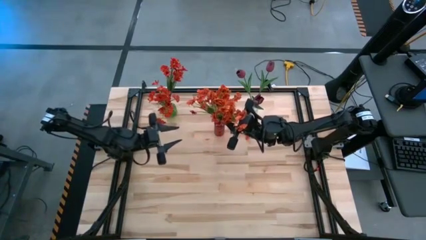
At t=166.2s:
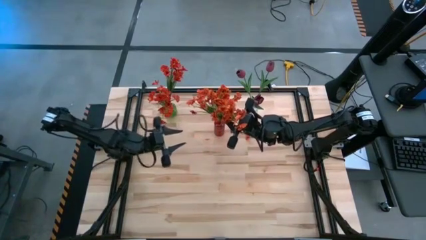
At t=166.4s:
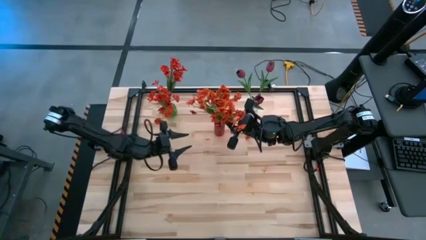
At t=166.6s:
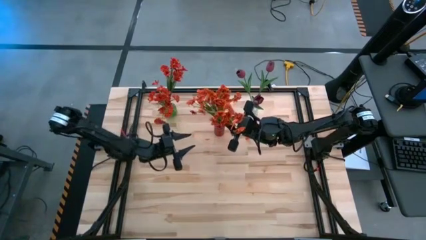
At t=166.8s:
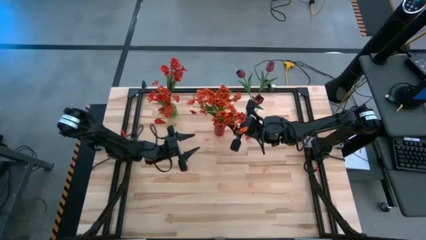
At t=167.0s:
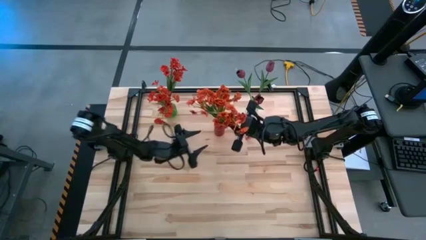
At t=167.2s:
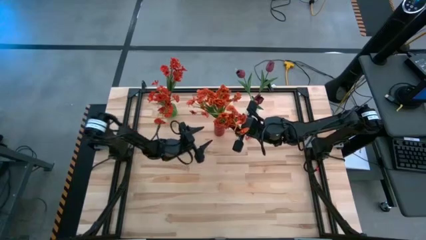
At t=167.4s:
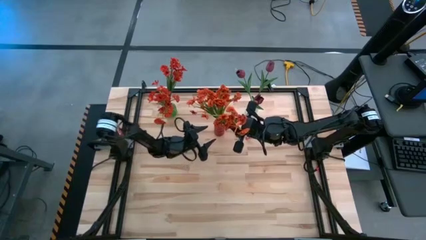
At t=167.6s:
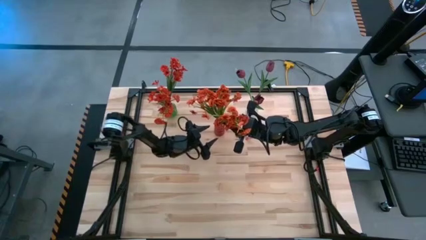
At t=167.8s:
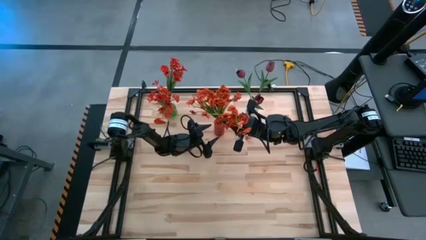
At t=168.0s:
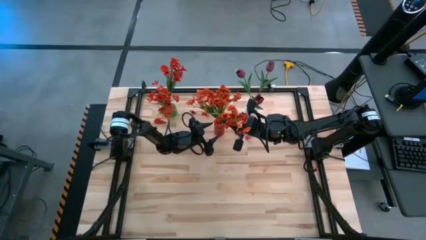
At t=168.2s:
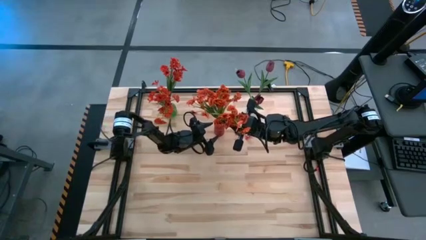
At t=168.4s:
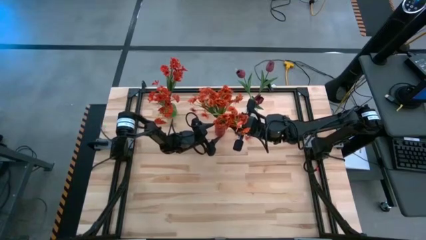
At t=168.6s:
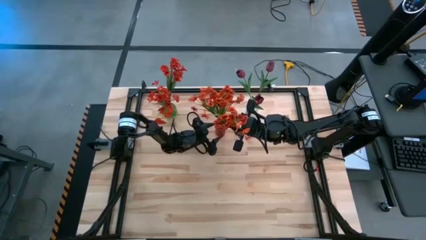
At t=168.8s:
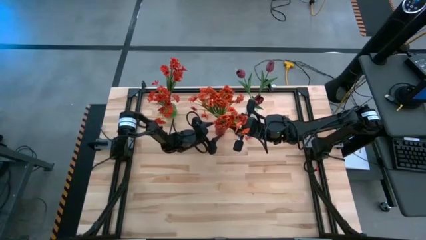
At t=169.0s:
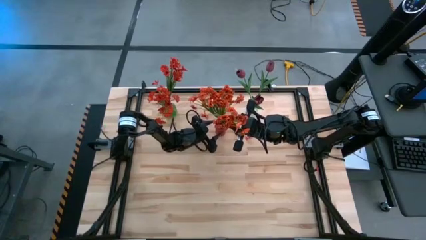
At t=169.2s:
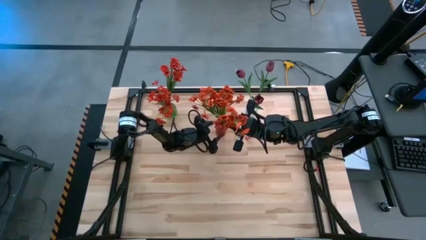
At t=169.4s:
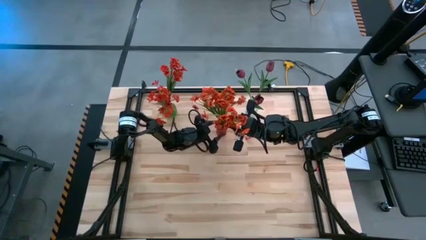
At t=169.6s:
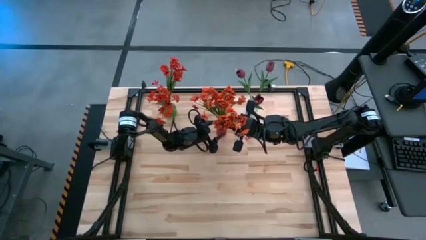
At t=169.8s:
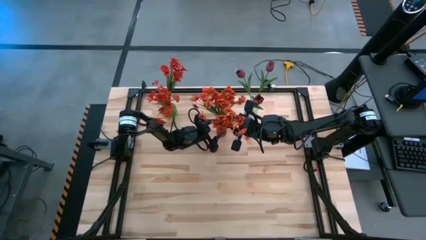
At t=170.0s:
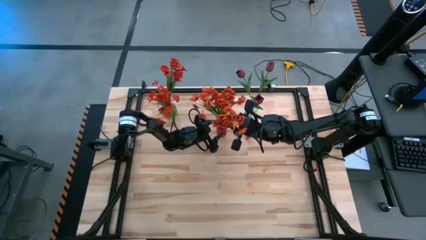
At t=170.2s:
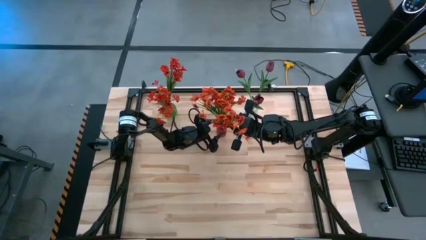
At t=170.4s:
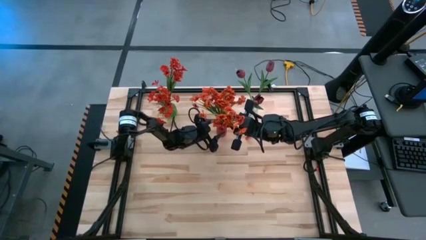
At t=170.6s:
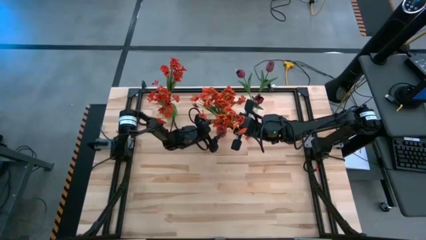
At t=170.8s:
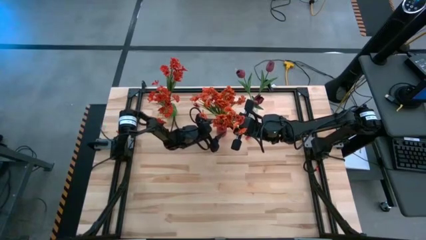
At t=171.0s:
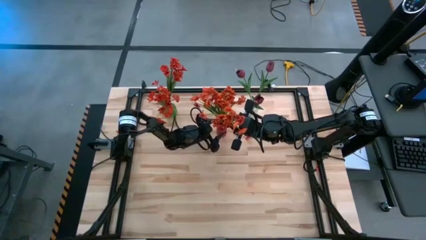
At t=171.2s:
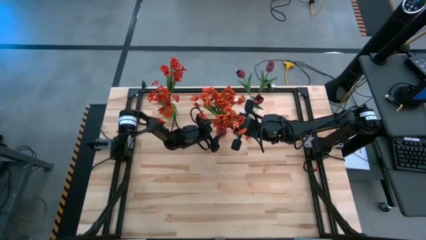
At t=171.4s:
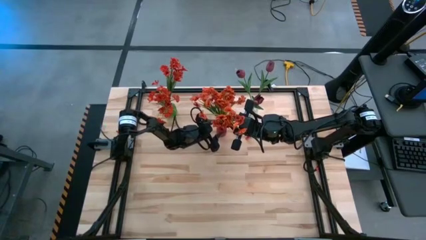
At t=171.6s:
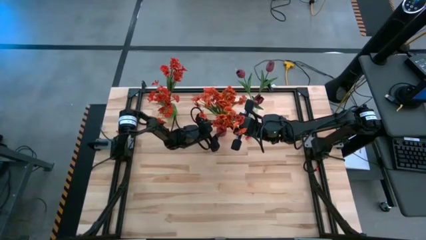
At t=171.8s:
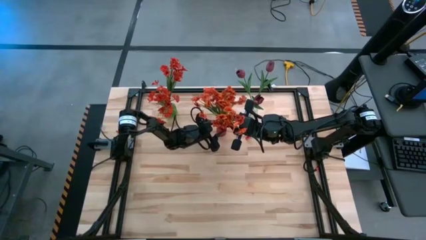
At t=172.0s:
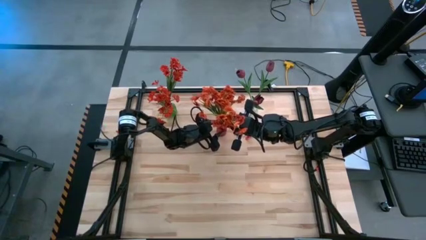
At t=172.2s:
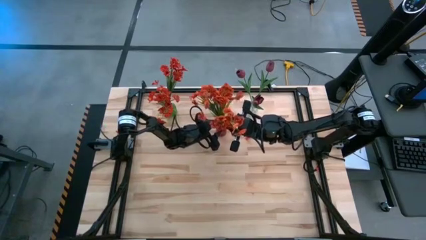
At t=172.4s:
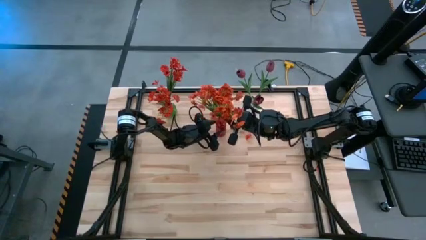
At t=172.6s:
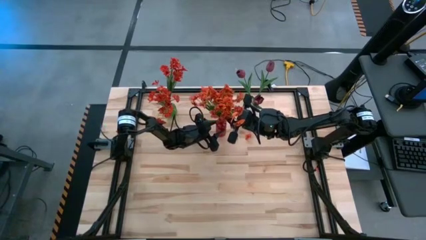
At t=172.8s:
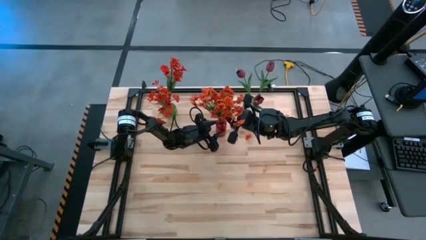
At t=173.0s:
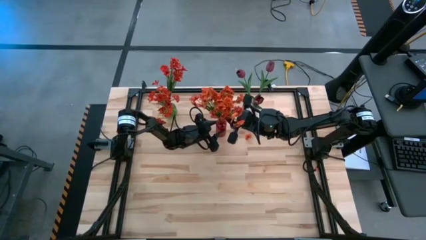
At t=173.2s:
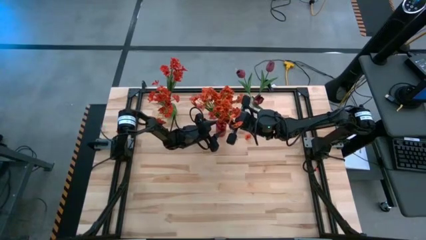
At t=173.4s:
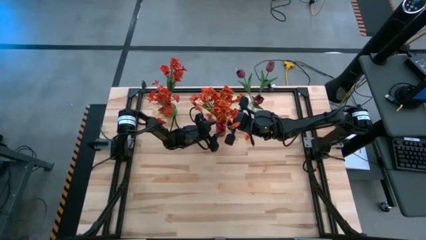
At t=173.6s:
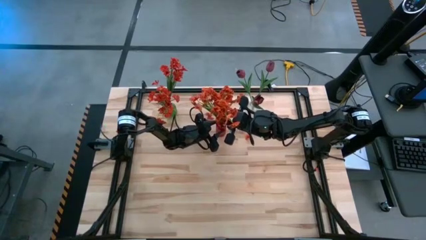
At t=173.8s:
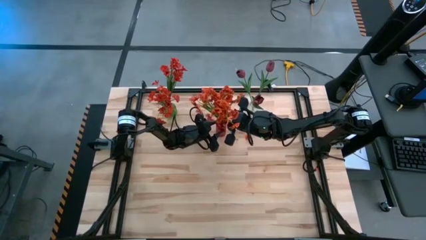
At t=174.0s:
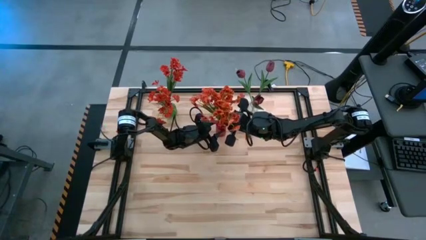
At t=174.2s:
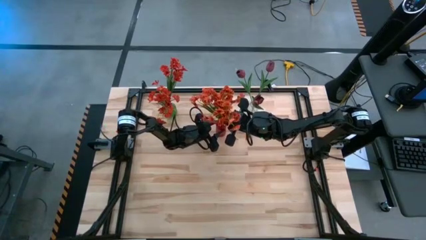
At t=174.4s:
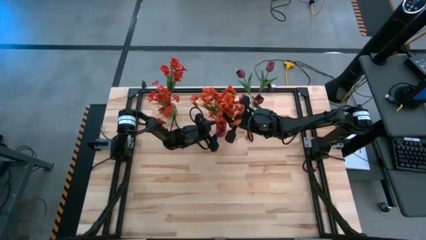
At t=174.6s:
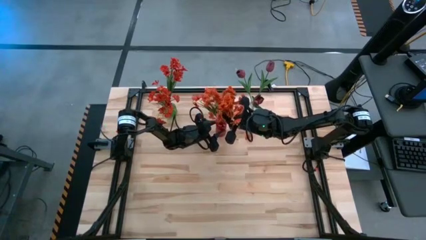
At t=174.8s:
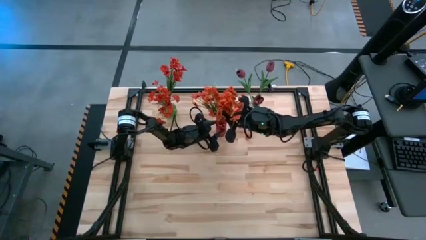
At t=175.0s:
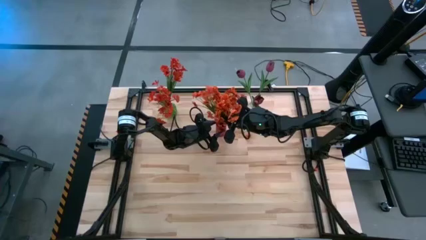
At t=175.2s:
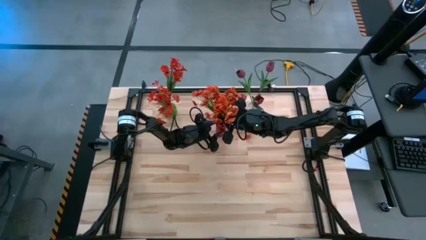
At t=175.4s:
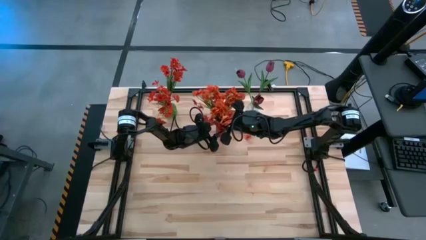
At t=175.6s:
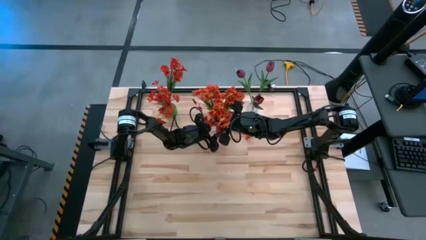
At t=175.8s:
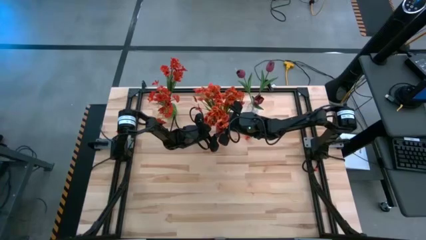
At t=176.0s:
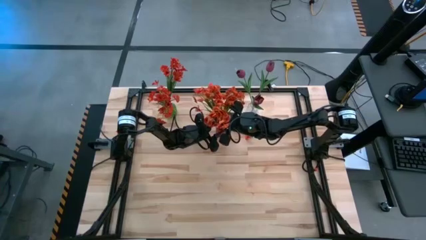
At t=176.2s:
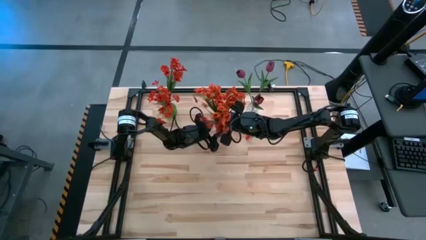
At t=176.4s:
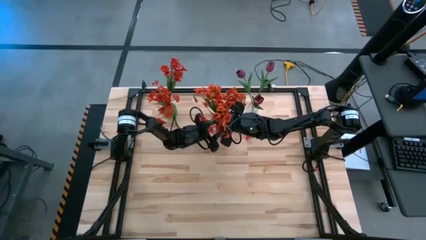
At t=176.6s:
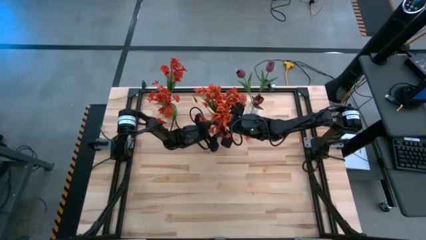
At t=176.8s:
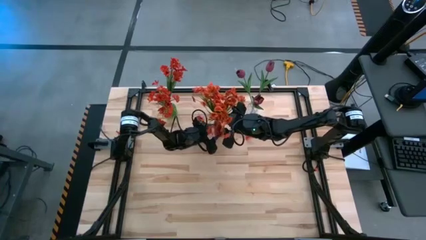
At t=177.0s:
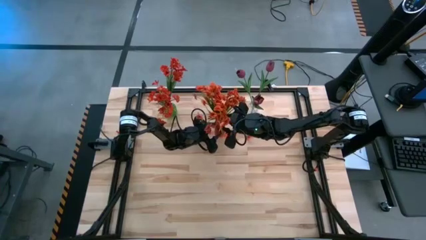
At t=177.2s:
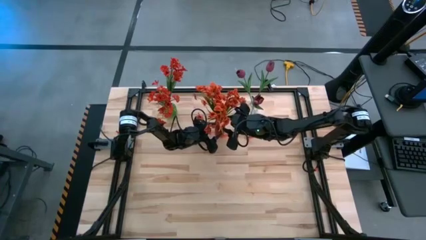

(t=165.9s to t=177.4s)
Task: Sort flowers into vase by color
Put the orange flowers into the red vase

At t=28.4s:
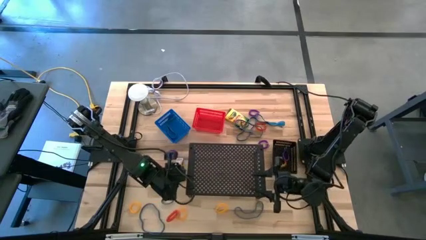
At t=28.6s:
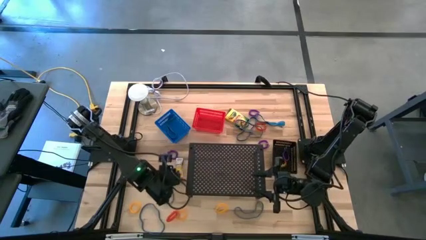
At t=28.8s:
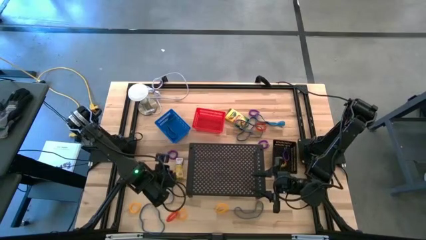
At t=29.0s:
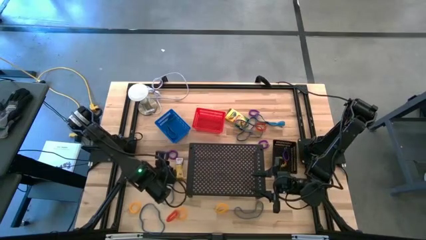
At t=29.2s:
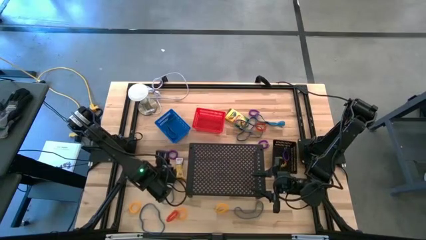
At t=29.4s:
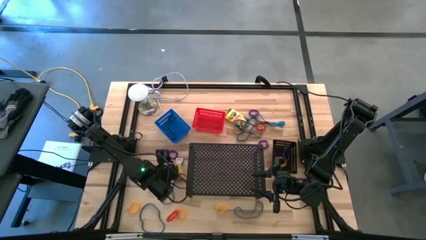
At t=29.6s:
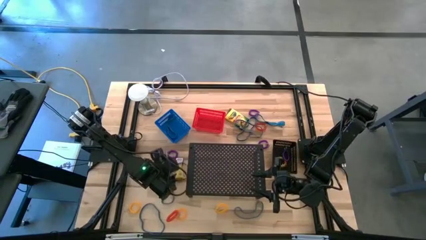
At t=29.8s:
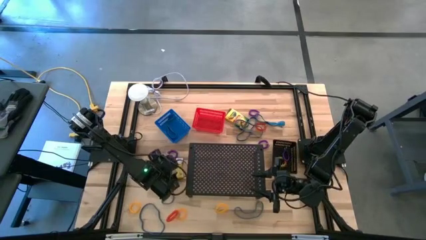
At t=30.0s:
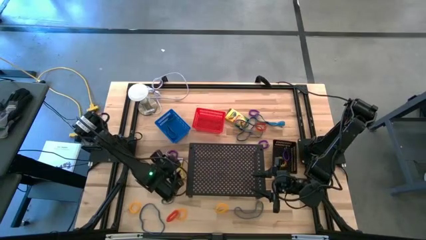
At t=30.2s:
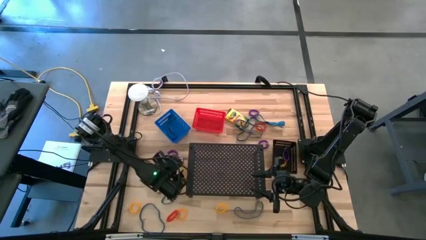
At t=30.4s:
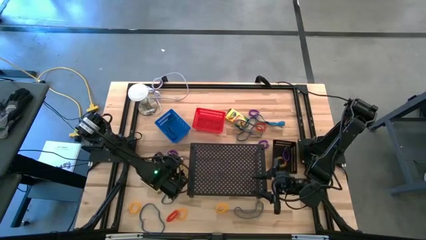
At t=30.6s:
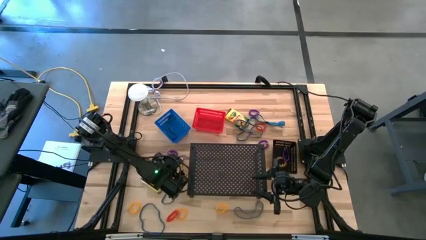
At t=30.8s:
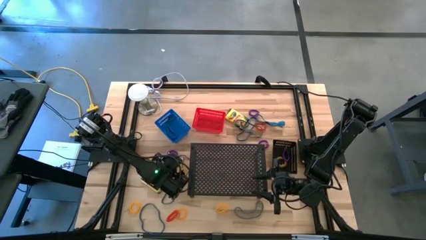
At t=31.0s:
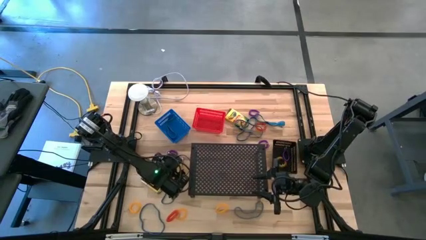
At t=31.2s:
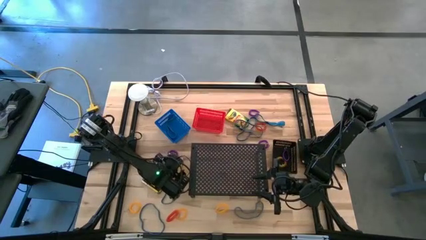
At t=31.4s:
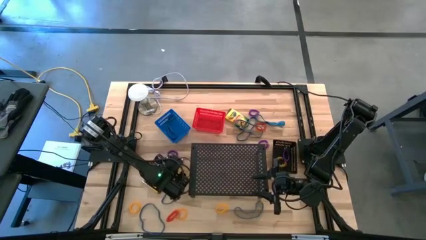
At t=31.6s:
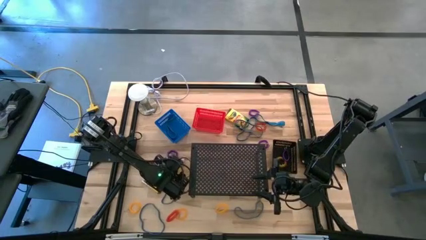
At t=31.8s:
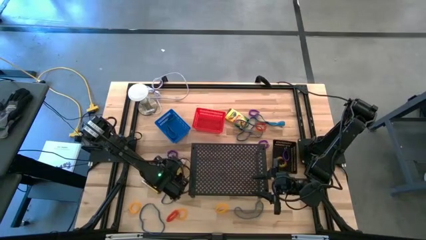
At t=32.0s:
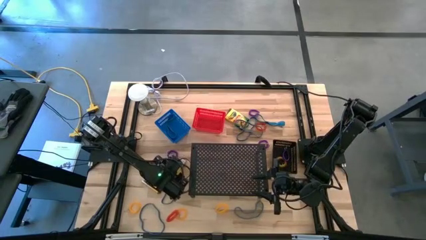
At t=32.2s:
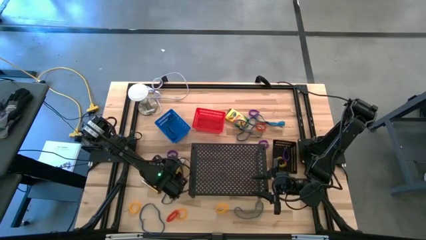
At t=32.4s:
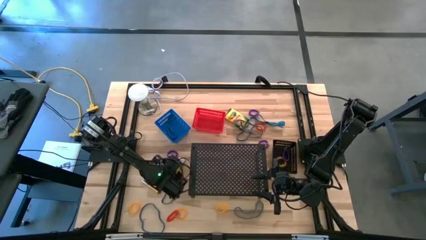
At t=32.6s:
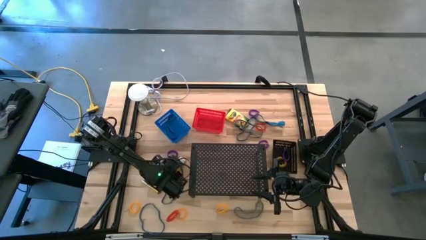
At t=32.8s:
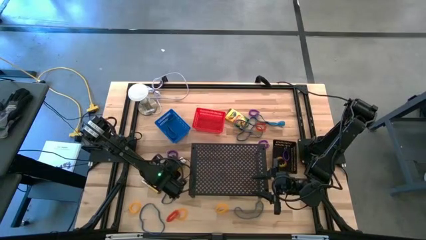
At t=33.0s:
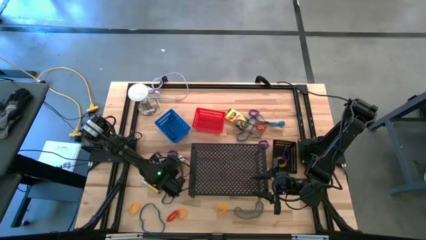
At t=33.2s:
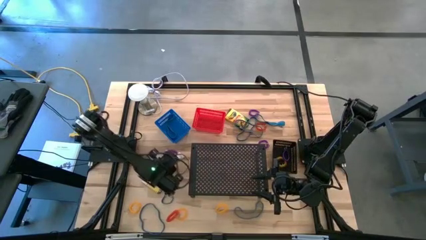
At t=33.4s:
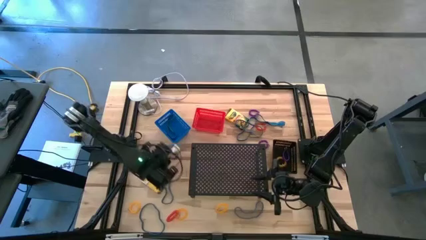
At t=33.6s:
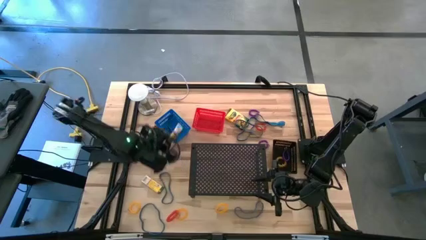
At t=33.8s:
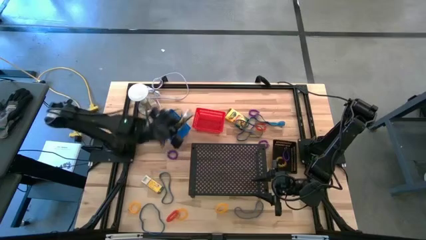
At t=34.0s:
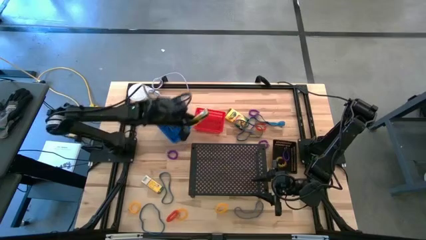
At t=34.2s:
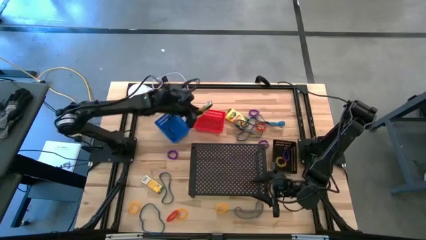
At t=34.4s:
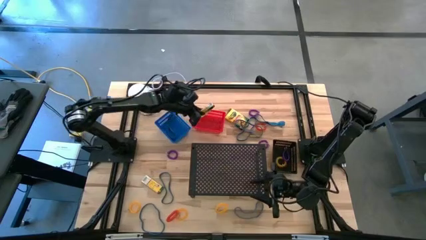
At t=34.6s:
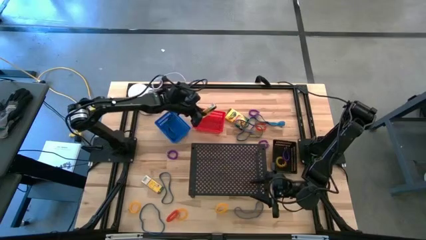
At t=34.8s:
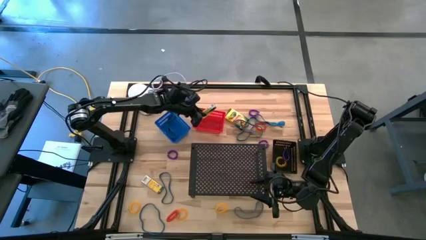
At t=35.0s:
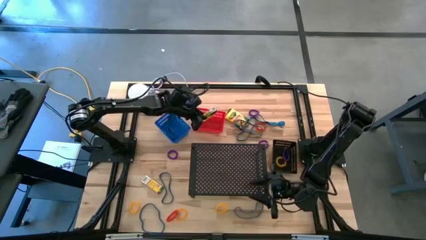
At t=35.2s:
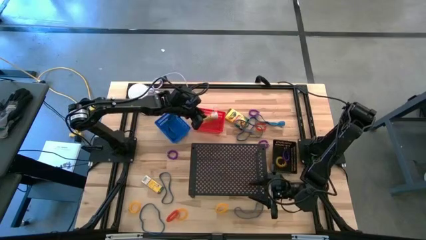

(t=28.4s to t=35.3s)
Task: Pick & Place Office Desk Supplies
Put the yellow crayon box into the red bin
